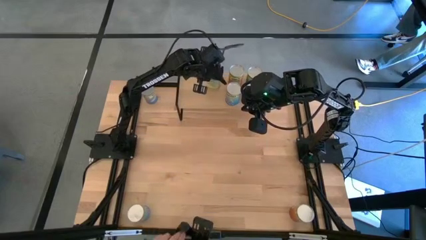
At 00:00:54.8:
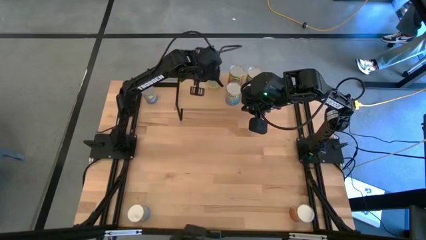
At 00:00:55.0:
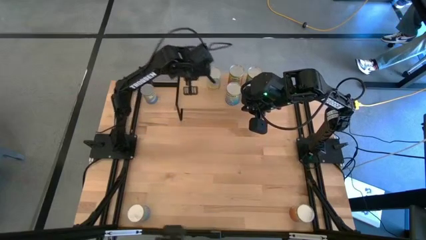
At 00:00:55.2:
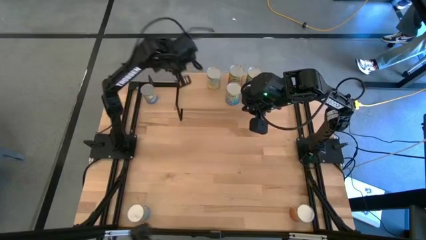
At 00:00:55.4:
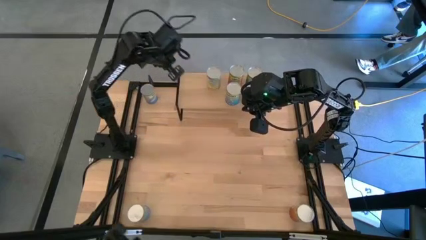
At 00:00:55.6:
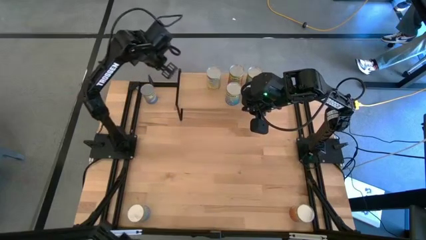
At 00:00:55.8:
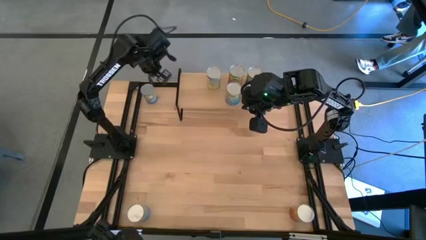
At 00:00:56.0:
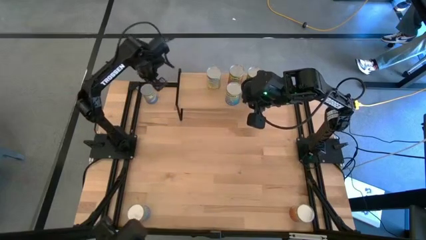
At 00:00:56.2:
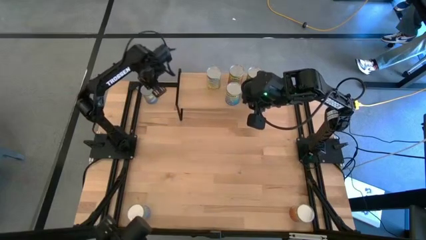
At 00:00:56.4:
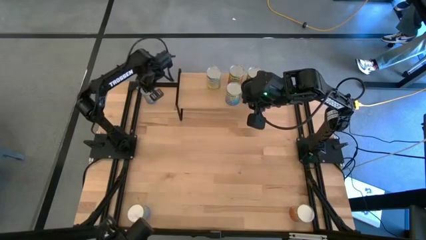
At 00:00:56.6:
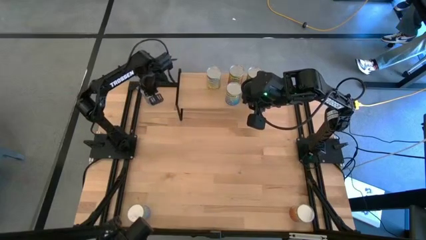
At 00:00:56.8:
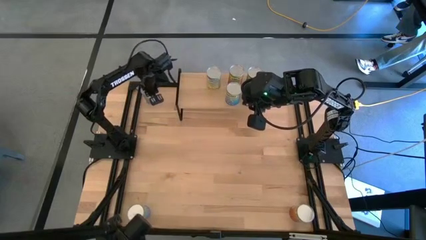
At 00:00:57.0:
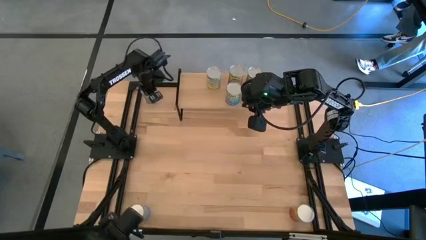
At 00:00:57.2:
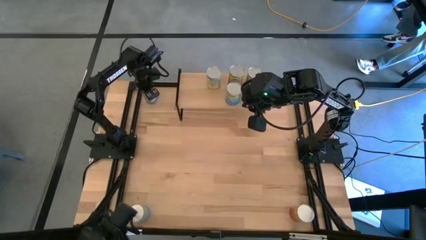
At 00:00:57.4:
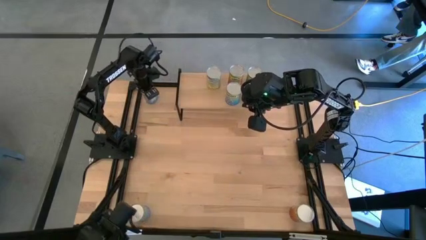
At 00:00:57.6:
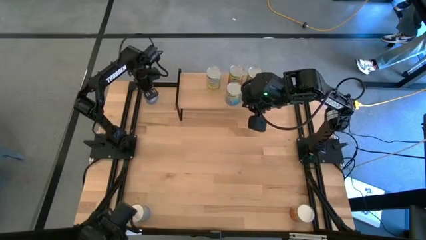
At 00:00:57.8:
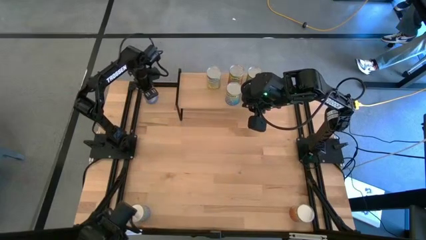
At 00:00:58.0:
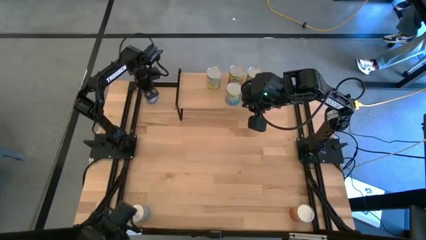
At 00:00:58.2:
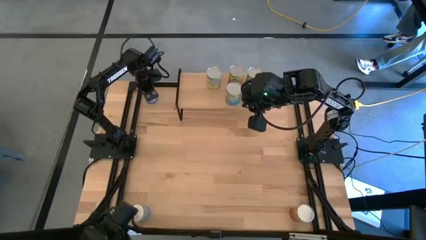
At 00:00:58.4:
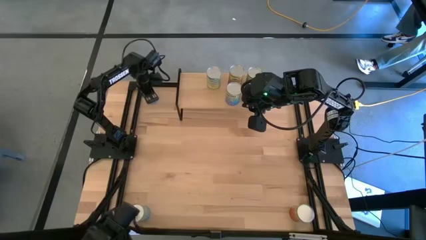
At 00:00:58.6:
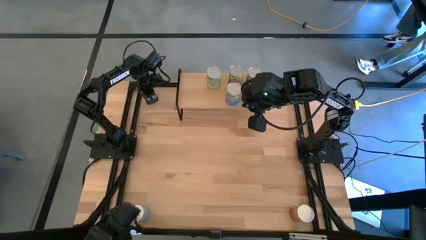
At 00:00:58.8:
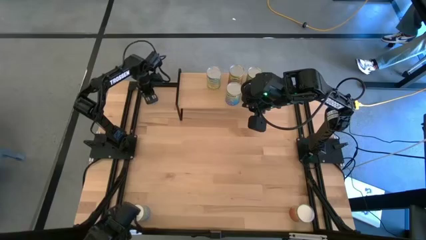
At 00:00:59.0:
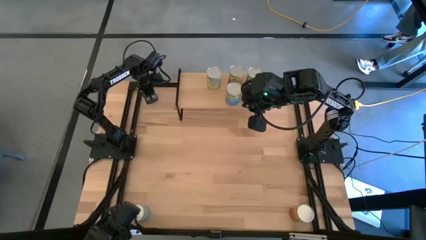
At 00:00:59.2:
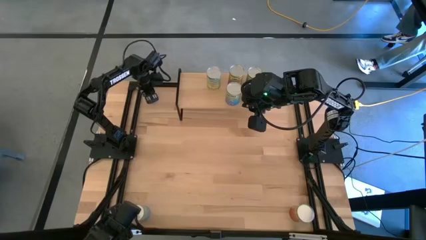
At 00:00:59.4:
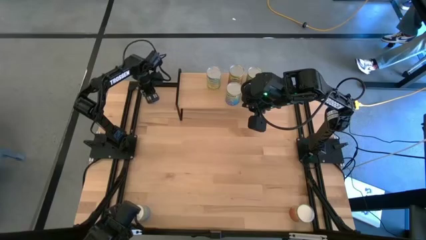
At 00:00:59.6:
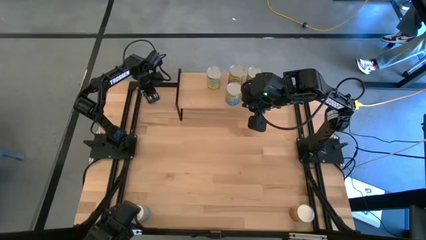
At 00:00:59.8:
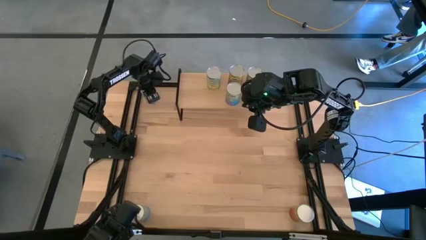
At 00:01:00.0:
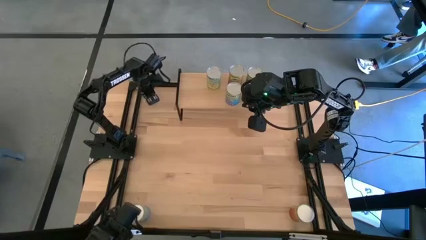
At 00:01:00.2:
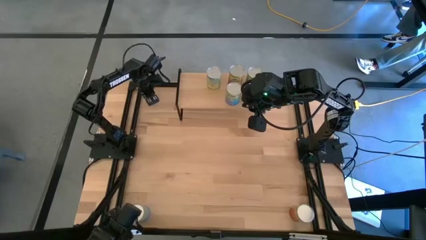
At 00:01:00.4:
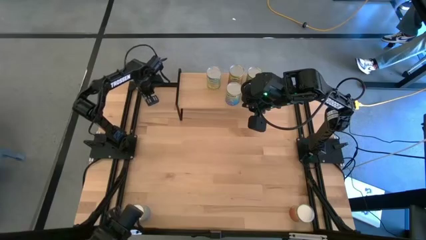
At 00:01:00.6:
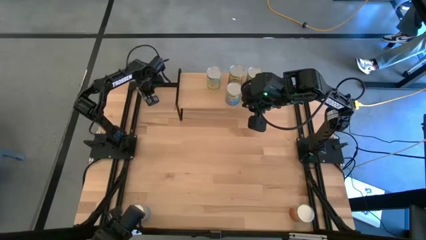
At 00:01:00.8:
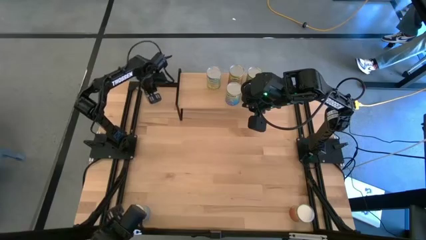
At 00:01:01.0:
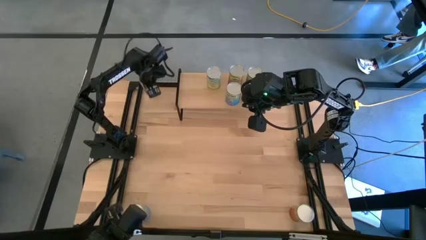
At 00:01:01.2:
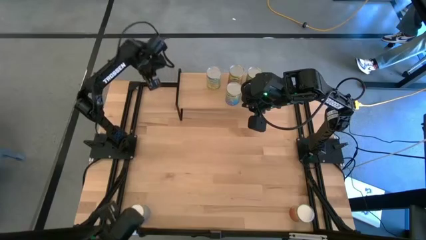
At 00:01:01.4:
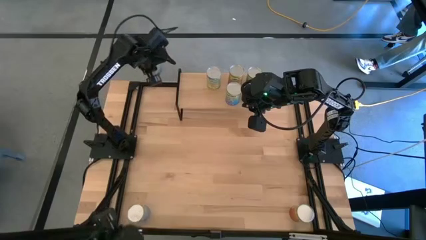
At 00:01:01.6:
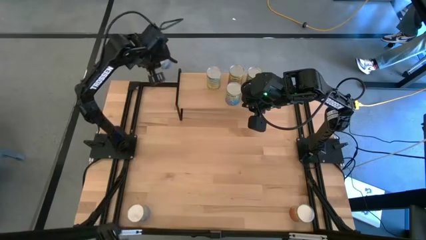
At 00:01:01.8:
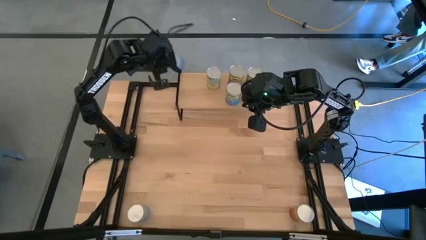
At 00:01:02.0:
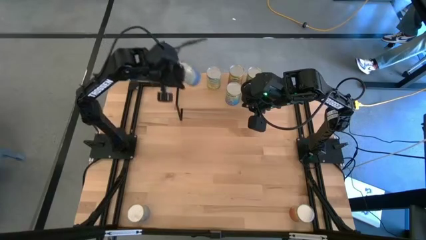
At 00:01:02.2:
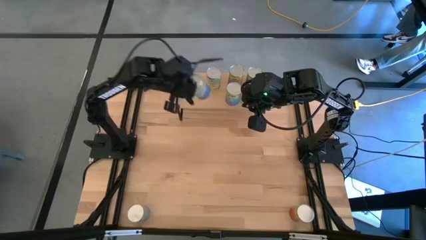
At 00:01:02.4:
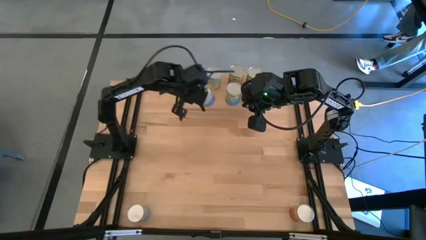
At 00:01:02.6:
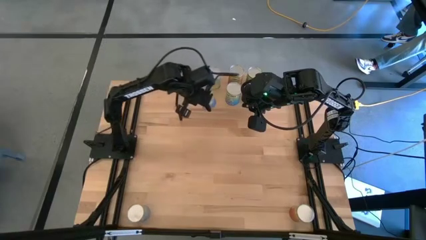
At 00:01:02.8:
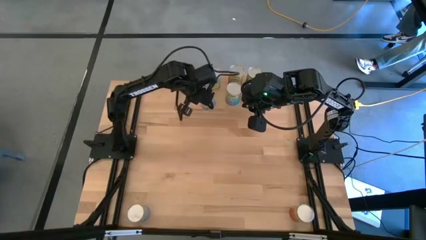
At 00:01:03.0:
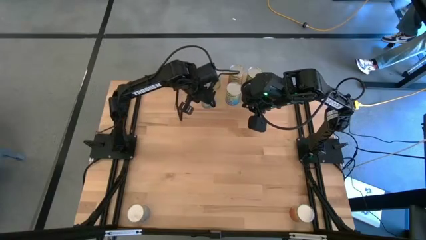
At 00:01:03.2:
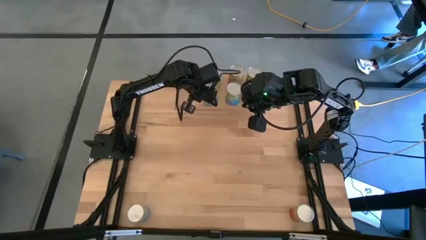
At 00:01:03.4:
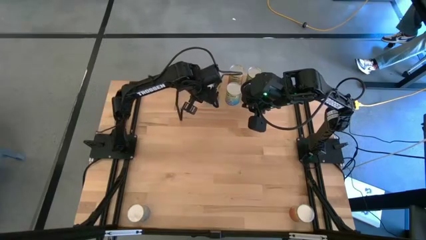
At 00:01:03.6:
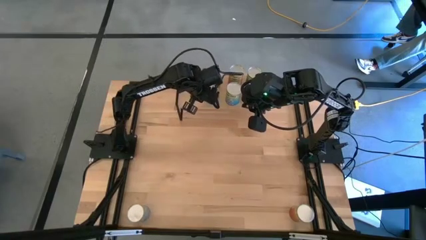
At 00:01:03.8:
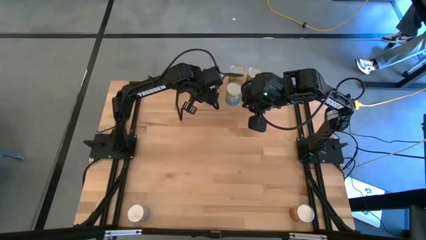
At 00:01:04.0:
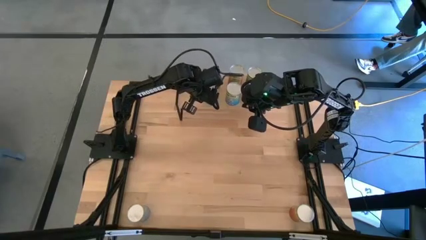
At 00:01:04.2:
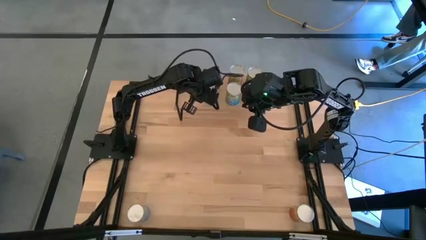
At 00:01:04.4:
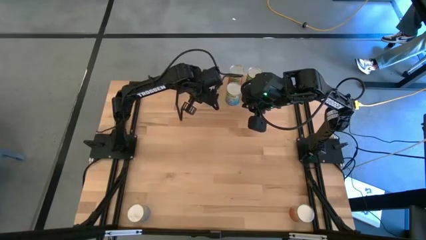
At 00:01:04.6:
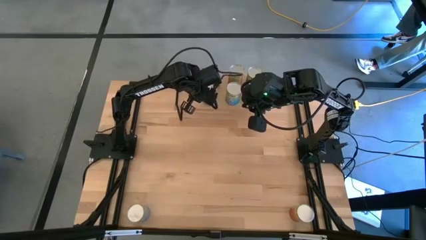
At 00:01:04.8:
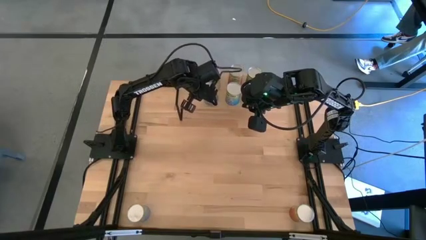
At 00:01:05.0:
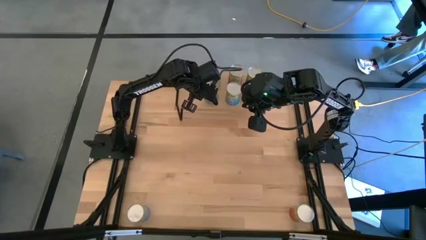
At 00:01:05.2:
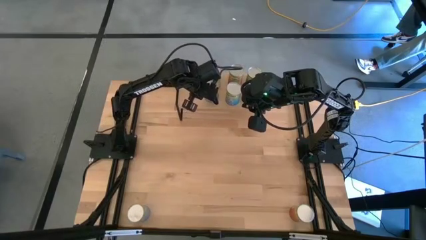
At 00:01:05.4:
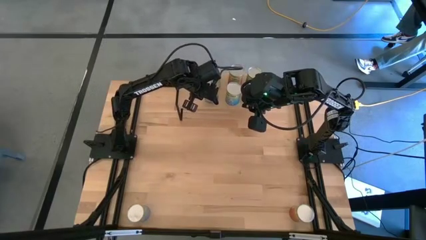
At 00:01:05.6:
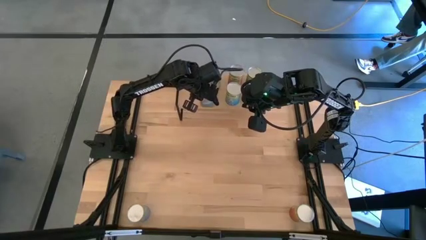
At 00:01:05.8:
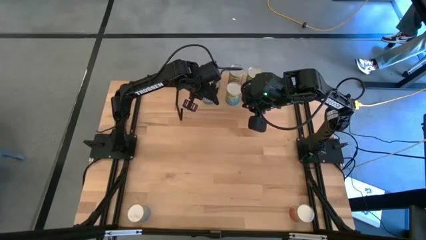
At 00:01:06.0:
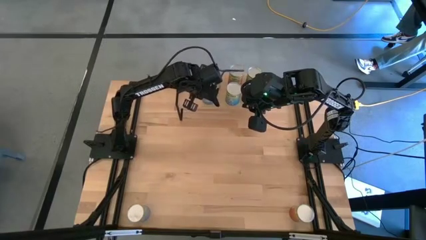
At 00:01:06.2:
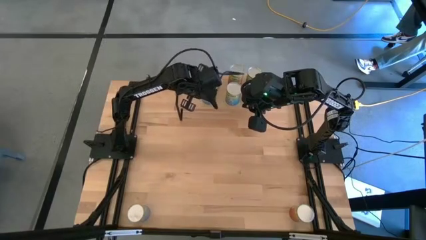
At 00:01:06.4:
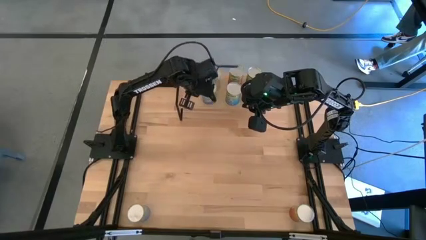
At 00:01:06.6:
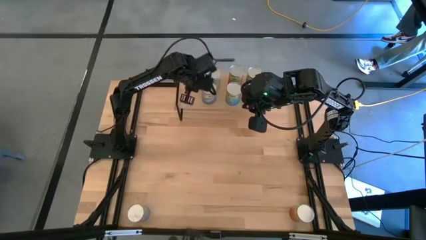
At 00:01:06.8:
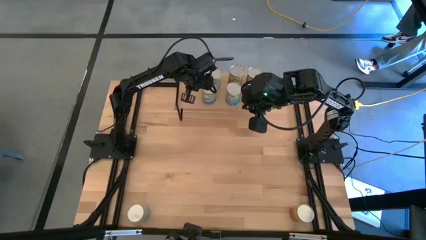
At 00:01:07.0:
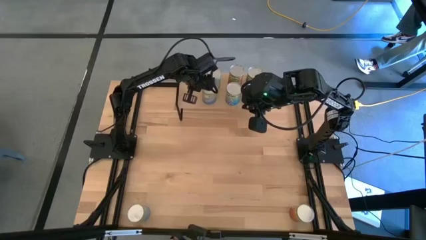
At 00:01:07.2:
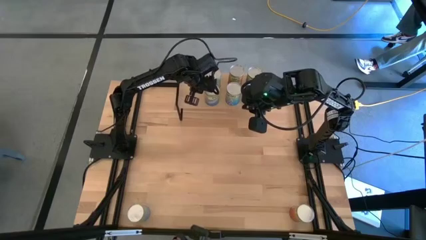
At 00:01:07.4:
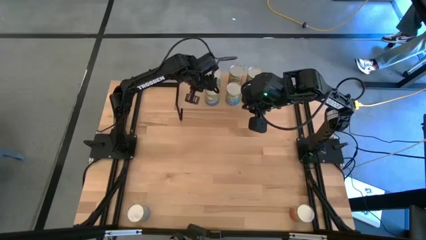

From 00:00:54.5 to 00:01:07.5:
Task: Pick and place cans onto a shelf
Put the canned peas on the shelf

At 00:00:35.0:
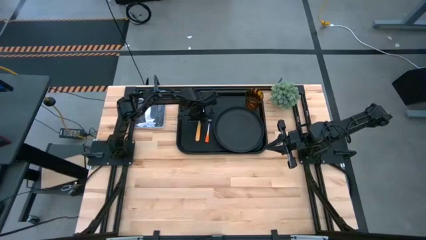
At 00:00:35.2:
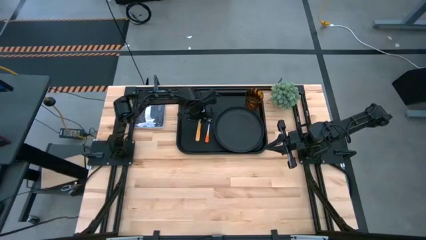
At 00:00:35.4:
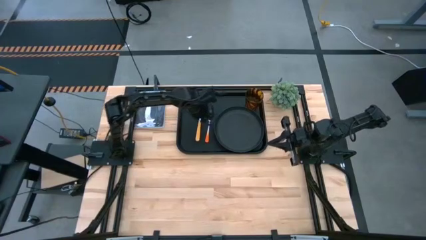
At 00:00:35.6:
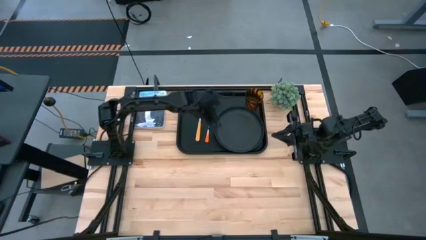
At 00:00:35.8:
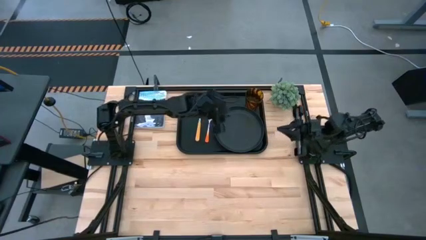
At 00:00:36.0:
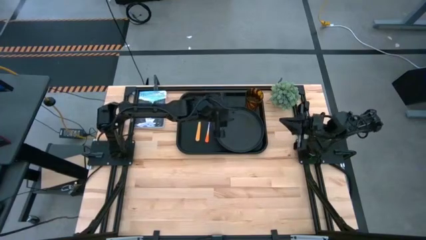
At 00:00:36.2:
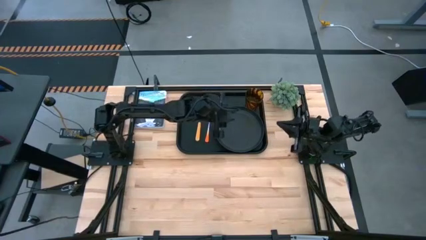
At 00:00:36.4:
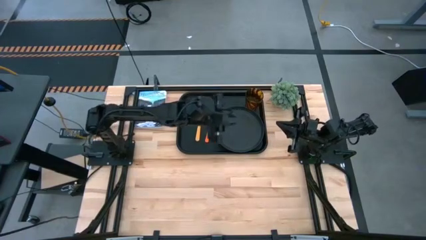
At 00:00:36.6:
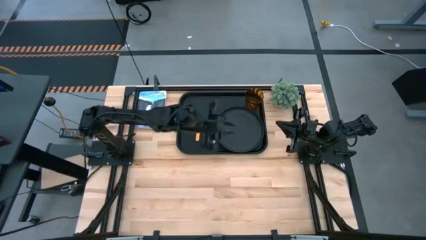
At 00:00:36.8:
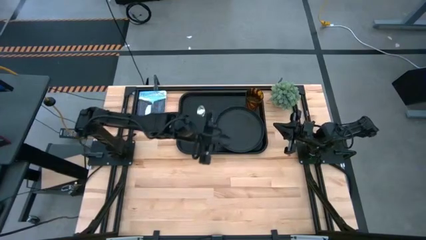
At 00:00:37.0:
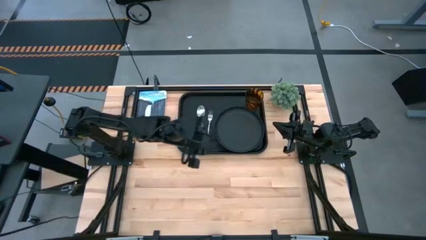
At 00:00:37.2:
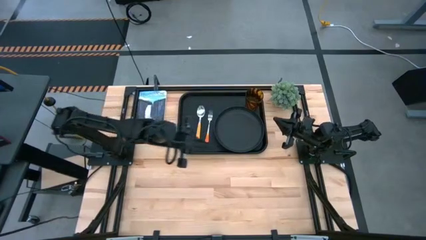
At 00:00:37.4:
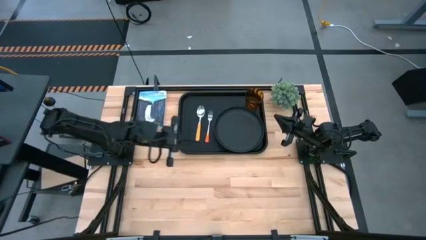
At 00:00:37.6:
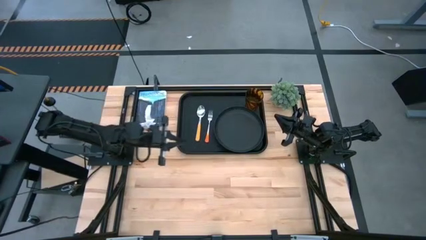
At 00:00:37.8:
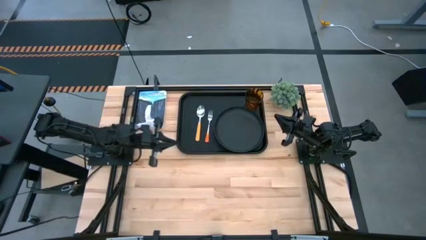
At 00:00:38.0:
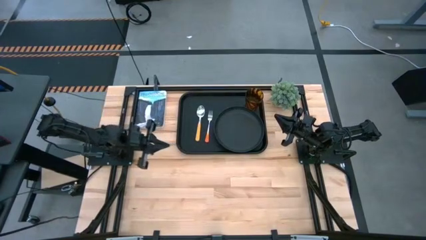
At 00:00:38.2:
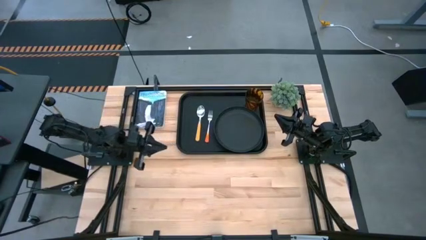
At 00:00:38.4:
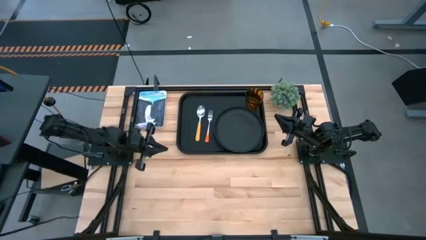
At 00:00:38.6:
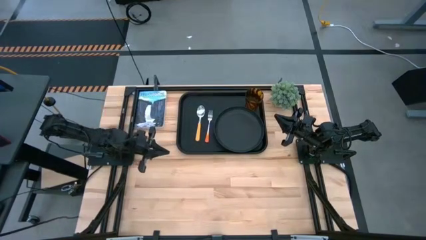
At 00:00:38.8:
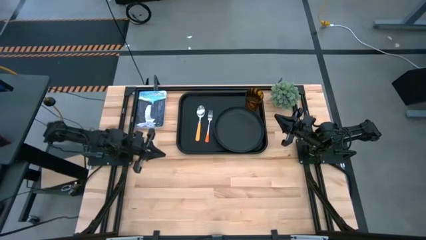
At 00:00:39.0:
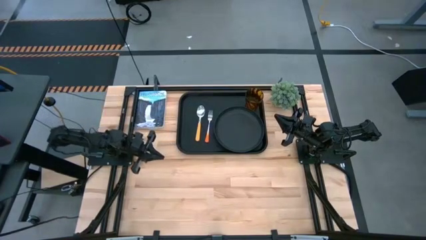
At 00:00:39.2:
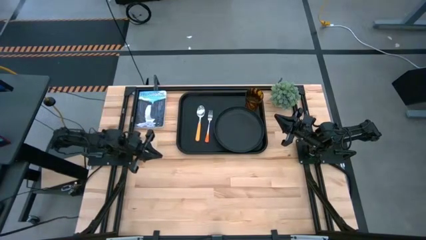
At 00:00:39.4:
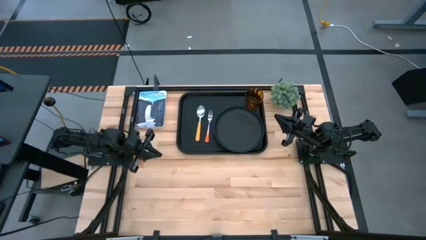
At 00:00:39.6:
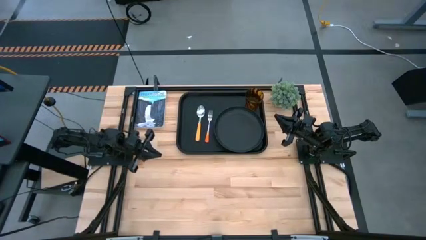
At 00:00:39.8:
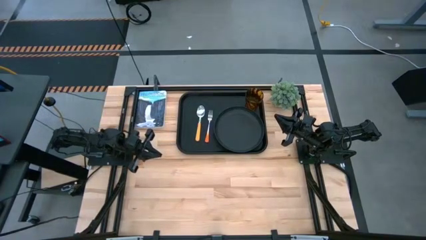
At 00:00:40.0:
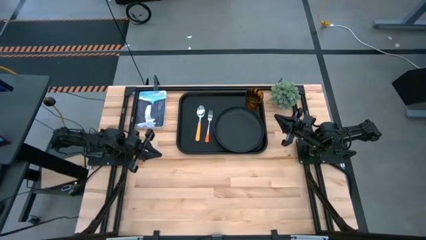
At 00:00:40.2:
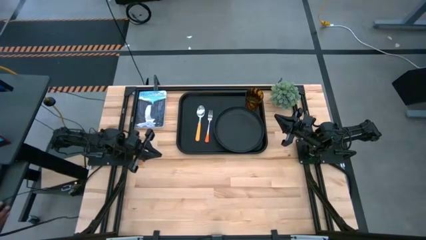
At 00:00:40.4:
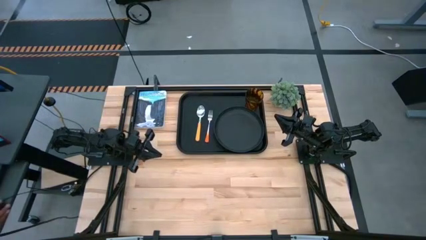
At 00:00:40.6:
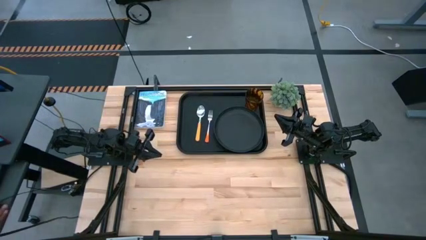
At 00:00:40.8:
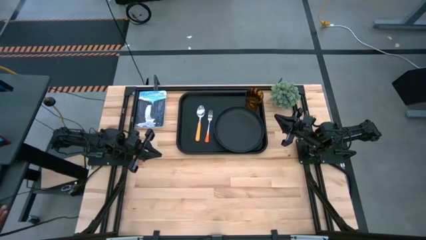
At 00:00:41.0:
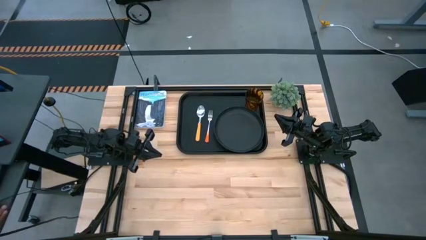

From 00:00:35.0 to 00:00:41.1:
Task: Pick and place plate/cup/fork/spoon on tray
Return to Home Position
